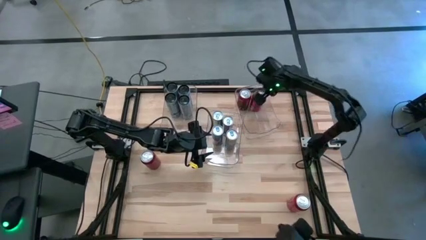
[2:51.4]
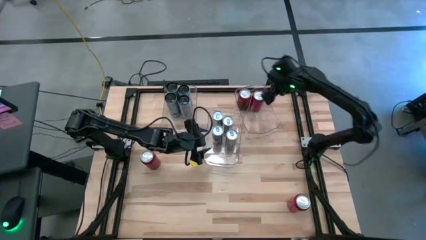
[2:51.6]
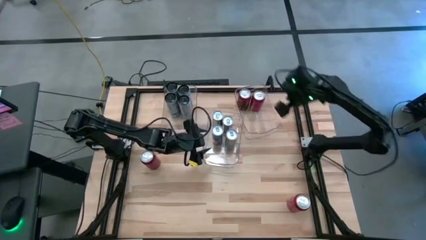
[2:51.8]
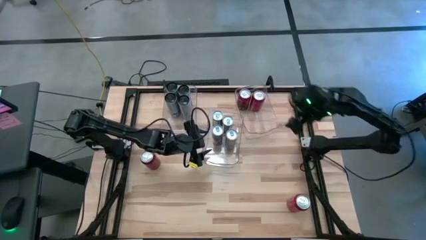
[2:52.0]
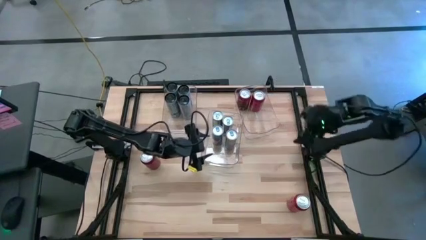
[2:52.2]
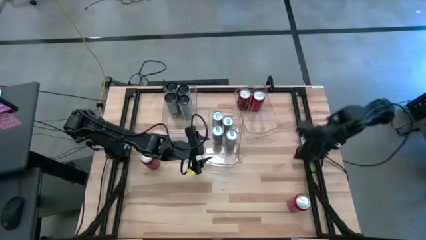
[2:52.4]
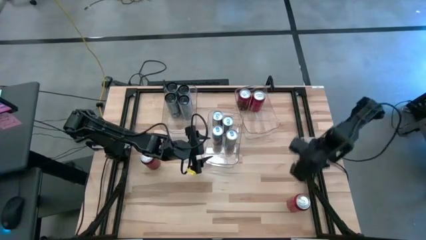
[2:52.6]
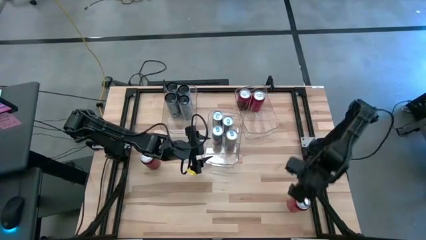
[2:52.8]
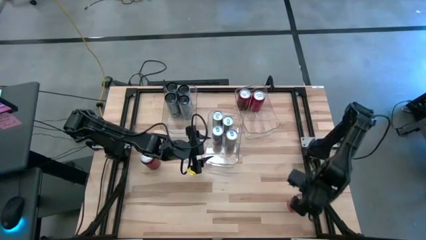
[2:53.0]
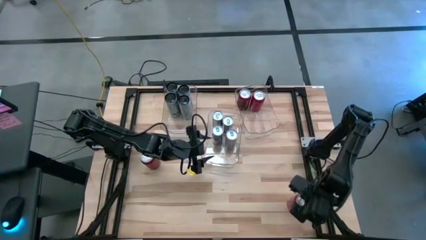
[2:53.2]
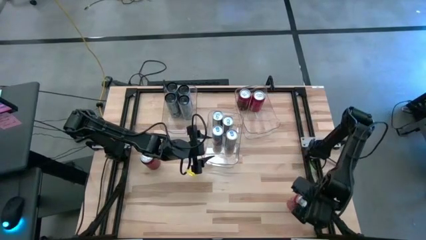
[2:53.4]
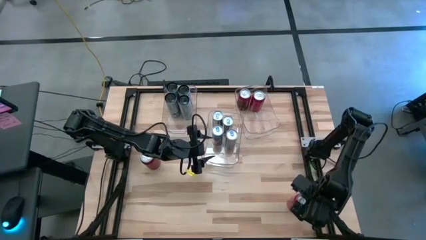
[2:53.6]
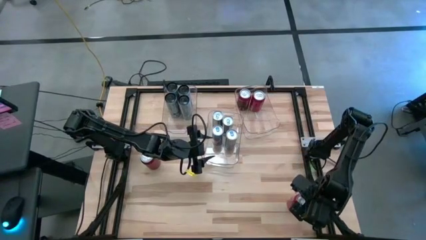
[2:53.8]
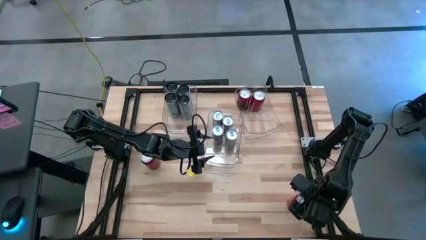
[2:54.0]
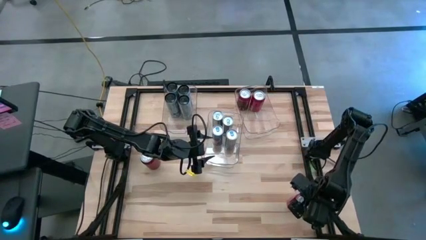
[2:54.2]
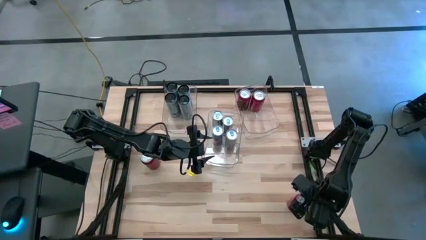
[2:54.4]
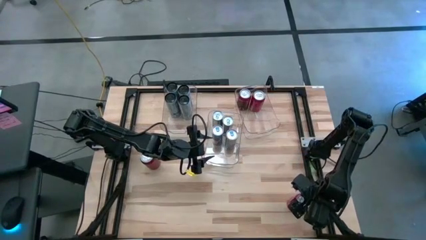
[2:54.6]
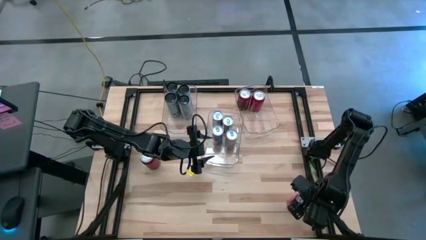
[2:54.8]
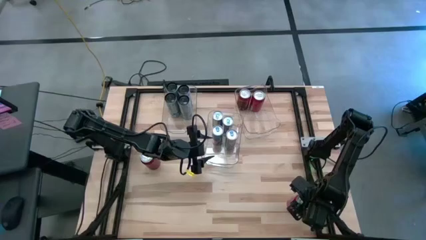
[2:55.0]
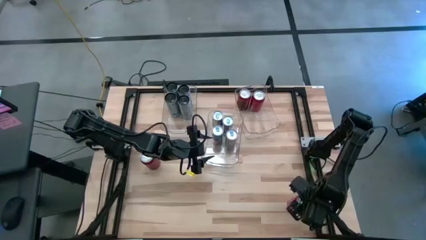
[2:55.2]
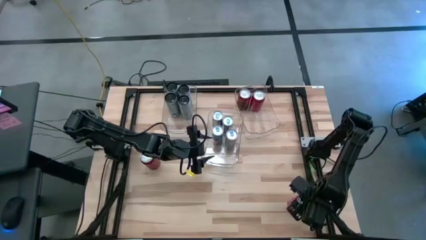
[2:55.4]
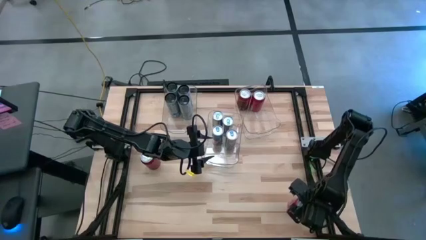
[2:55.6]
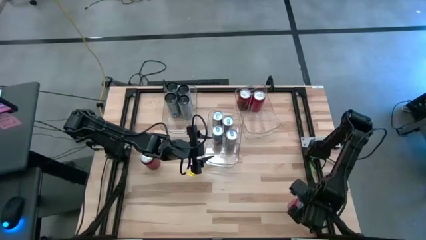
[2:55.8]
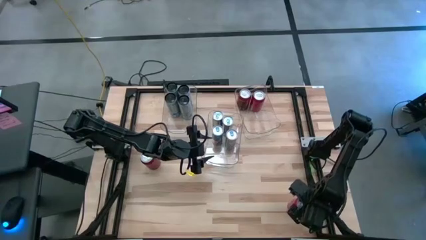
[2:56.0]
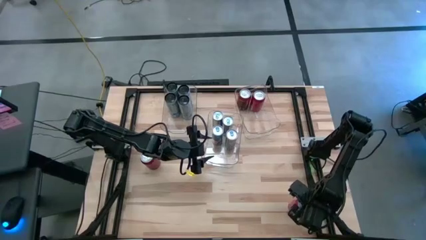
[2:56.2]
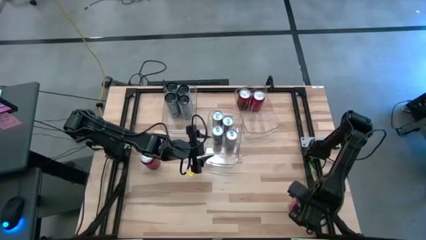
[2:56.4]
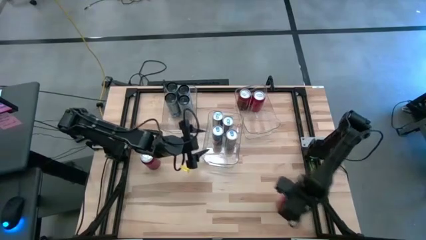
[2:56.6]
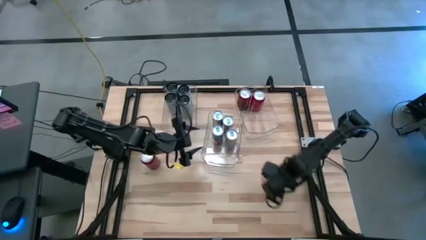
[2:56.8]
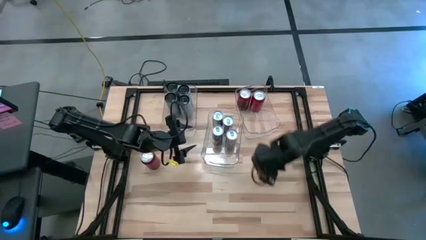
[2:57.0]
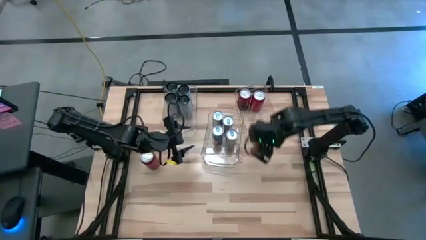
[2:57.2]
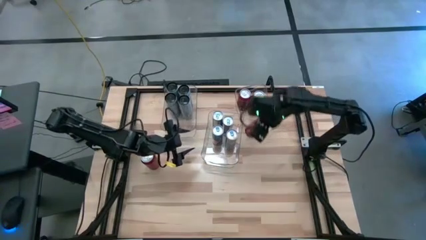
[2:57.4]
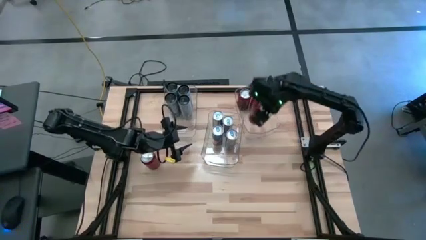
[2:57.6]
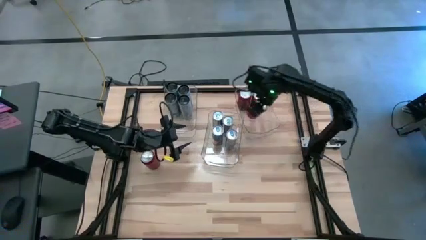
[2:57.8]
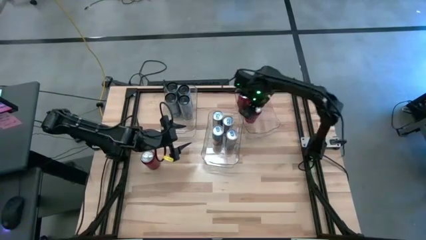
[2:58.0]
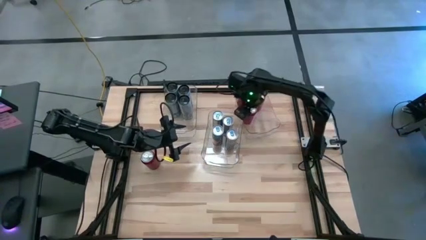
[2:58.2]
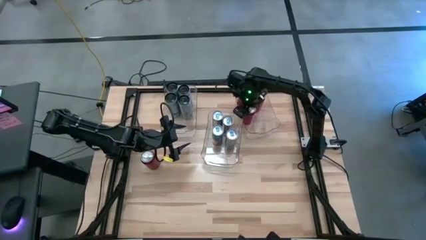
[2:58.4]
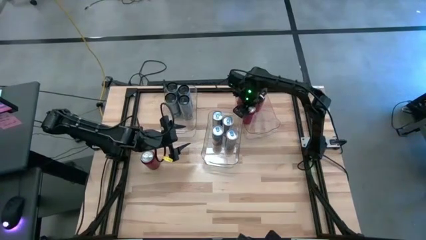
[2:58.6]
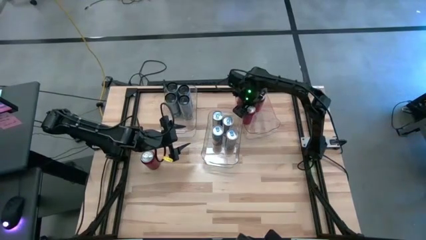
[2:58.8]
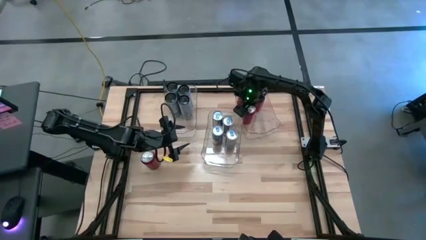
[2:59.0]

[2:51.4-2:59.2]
Task: Sort soda cans
Put the red-black soda can into the right transparent bin

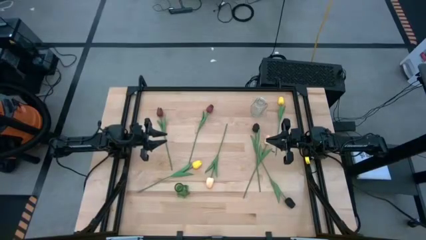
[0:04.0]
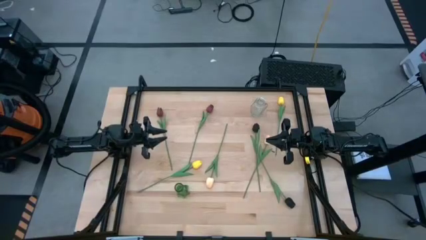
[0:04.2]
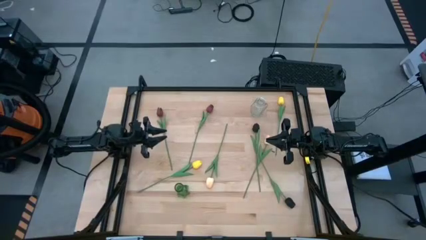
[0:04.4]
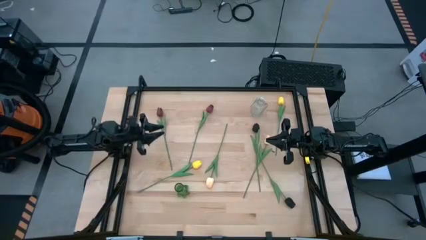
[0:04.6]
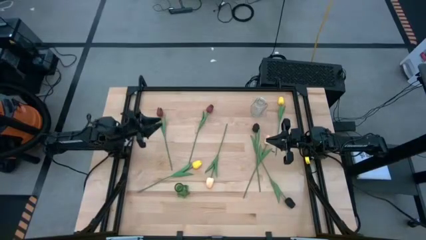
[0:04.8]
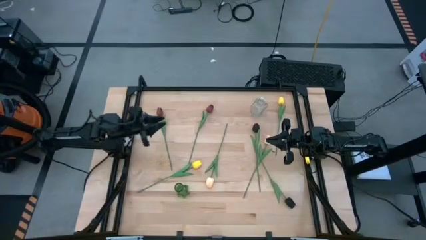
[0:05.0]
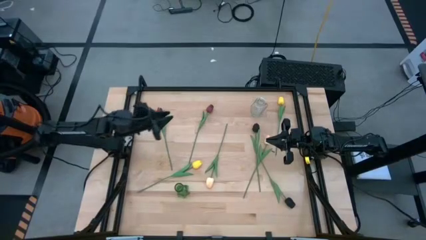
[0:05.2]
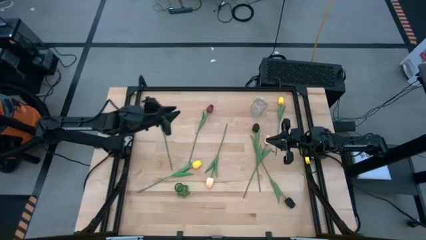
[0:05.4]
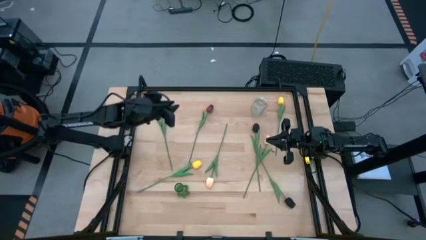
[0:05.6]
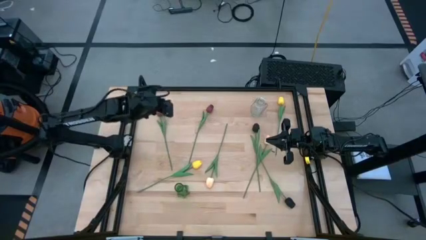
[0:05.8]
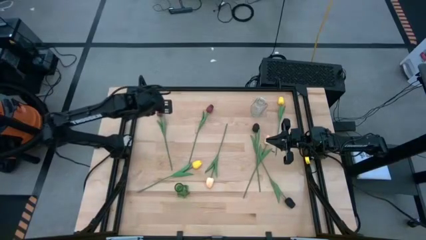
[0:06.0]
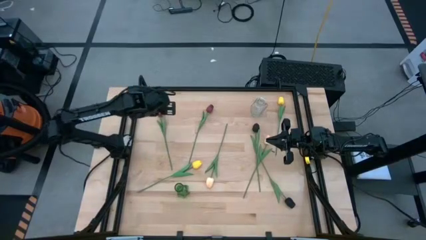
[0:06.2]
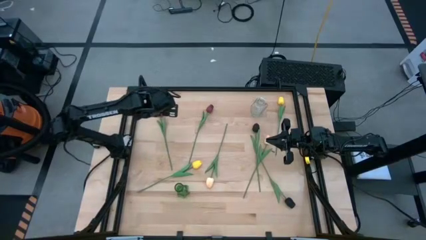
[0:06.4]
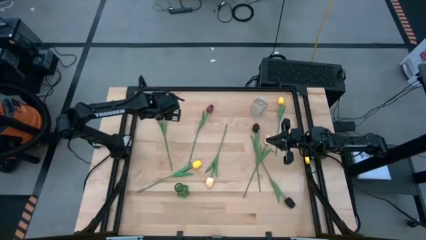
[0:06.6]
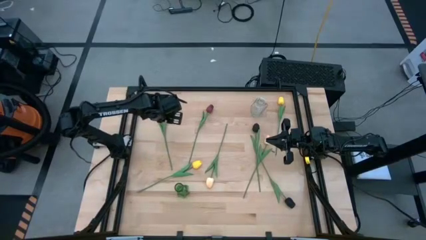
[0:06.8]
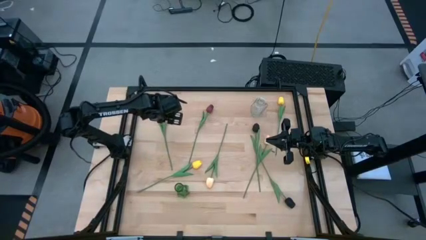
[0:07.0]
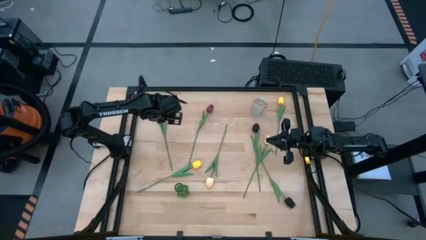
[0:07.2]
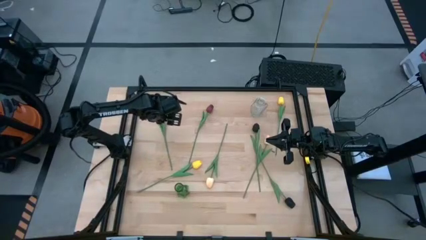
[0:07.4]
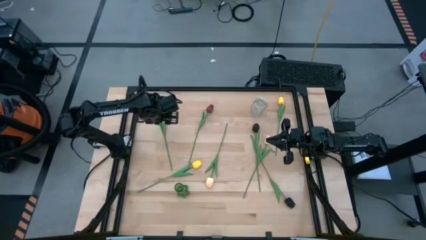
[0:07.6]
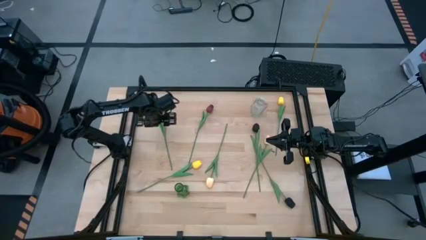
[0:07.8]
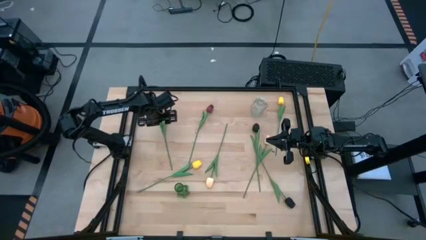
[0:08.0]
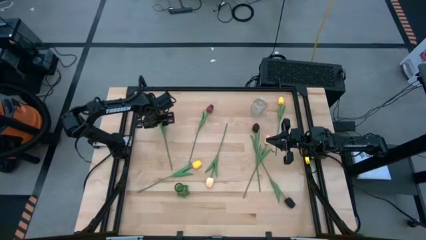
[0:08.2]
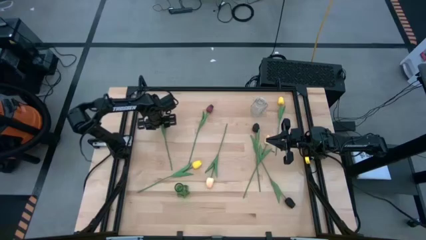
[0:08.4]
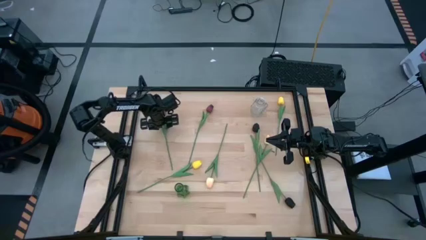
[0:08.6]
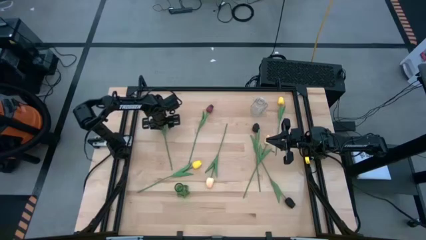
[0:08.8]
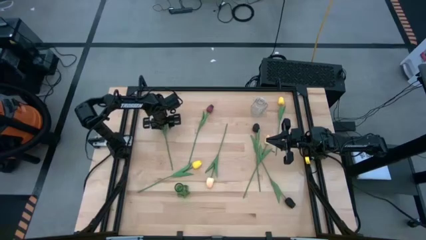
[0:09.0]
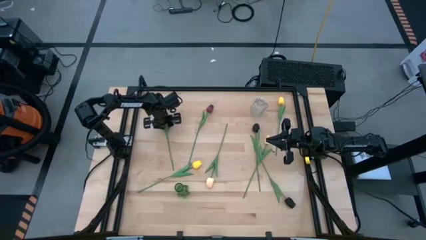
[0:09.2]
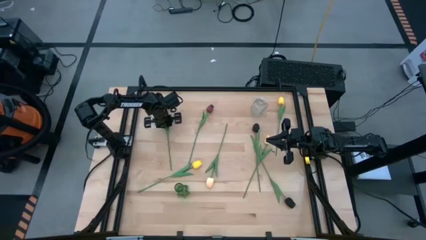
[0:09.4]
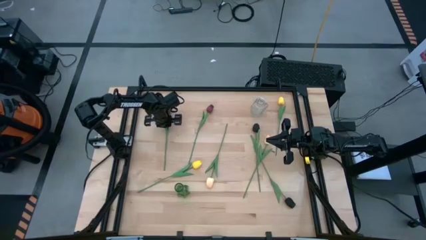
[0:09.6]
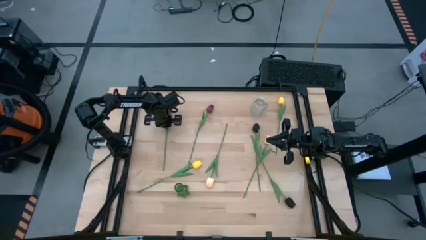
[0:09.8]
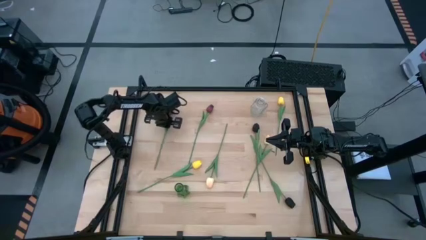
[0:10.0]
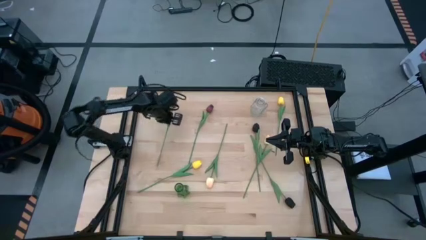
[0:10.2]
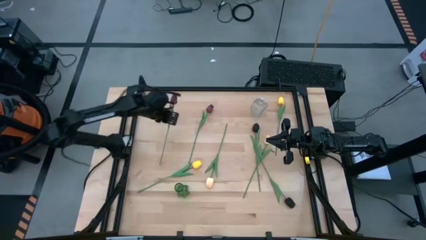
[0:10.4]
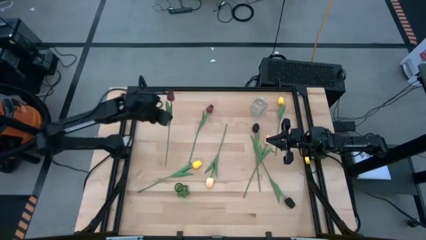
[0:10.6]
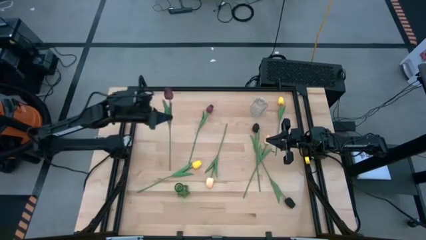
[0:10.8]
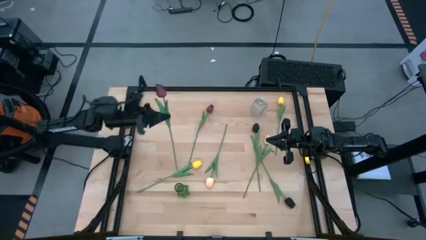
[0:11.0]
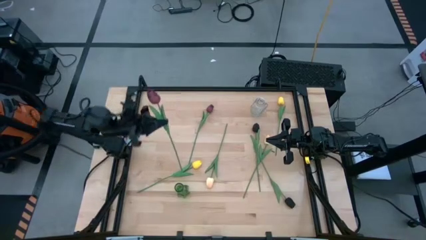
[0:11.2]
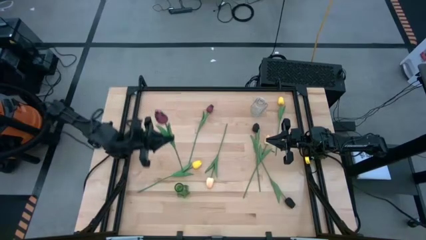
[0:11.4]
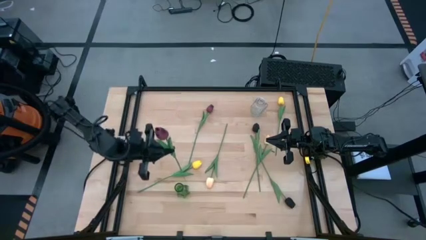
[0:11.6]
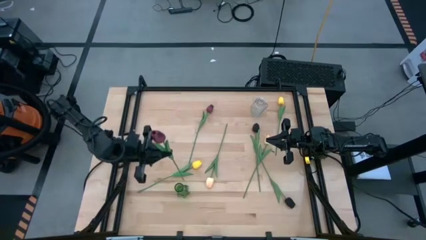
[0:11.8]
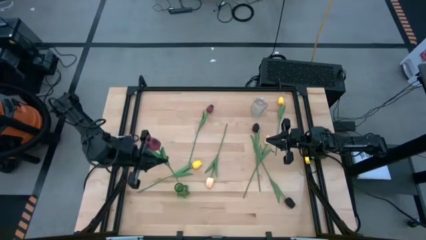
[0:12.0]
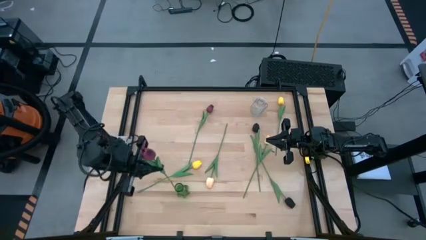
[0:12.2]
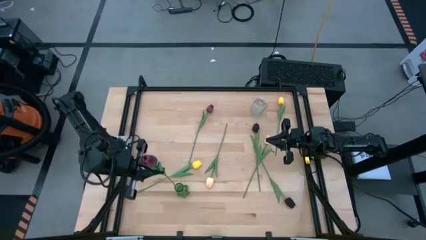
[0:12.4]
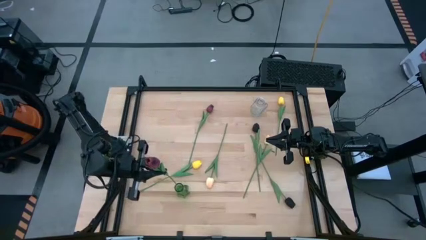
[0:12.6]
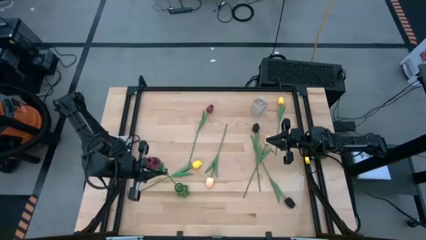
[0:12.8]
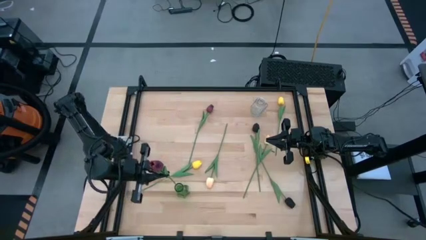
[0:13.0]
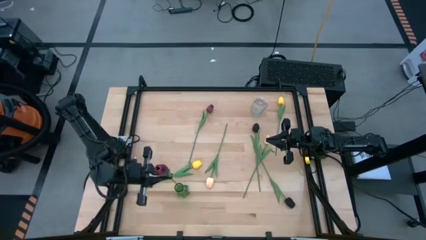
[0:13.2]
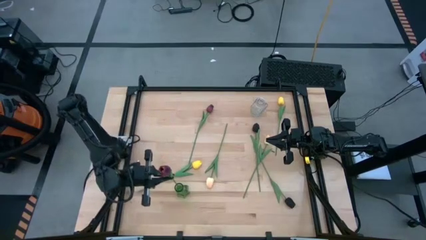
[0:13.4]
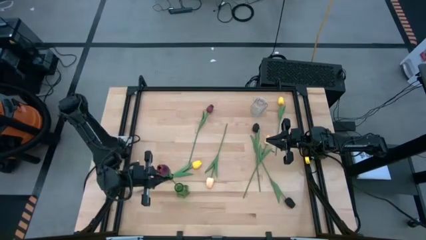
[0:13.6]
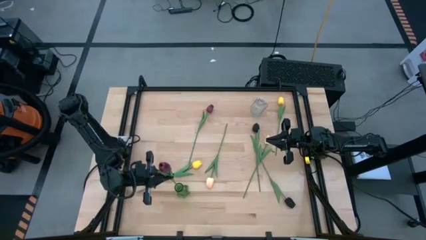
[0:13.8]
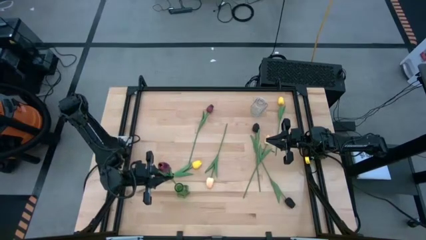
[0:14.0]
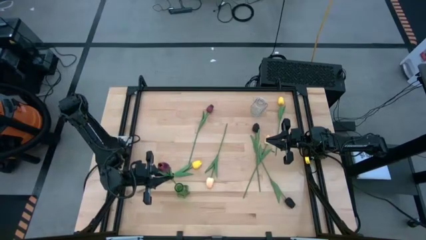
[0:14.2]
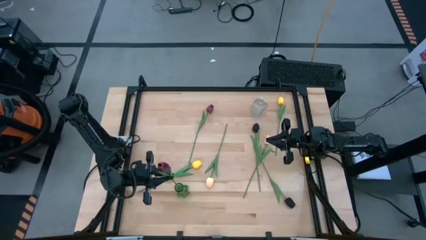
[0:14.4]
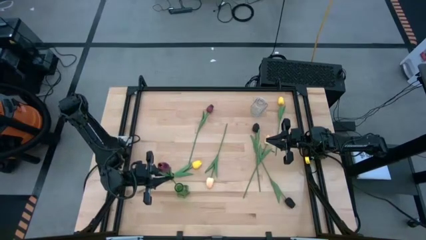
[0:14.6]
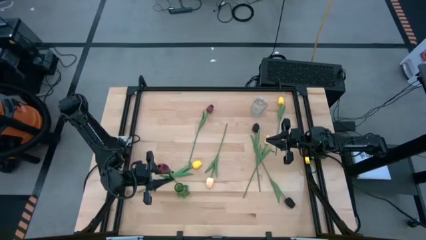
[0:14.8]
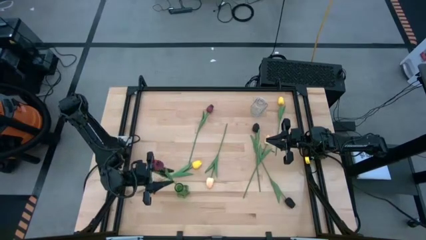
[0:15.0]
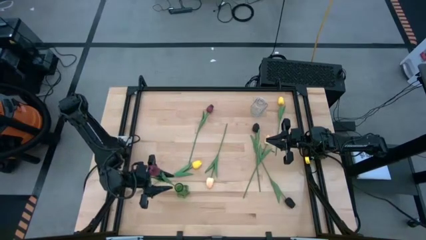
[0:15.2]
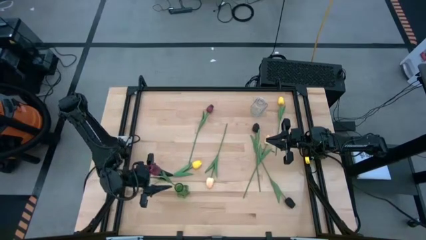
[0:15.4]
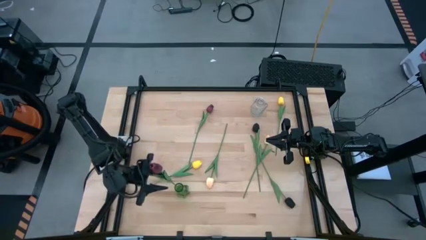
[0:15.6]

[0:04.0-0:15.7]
Task: Sort flowers into vase by color
Put the left dark red flower into the green vase
